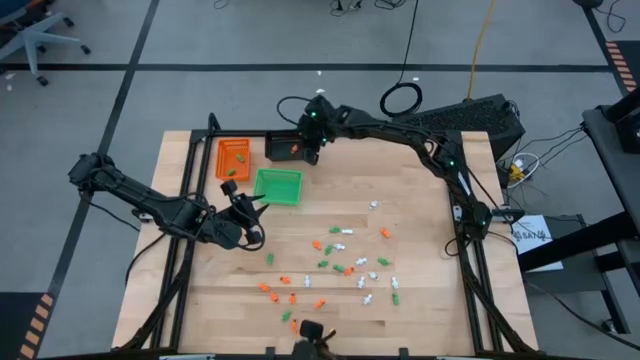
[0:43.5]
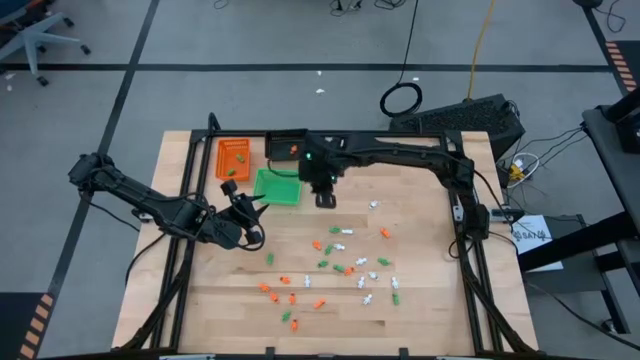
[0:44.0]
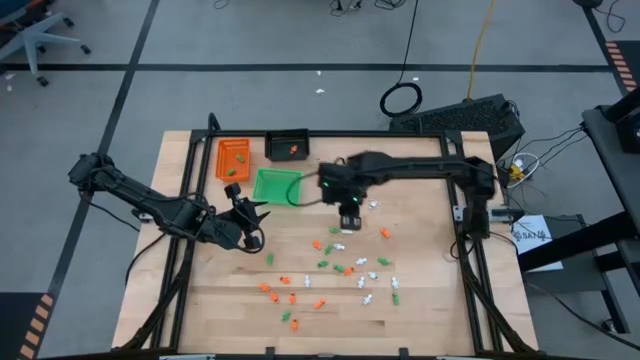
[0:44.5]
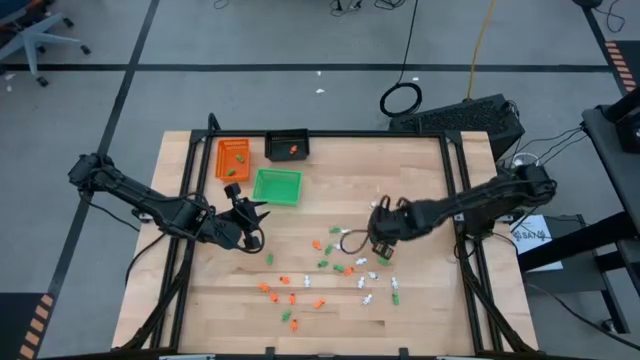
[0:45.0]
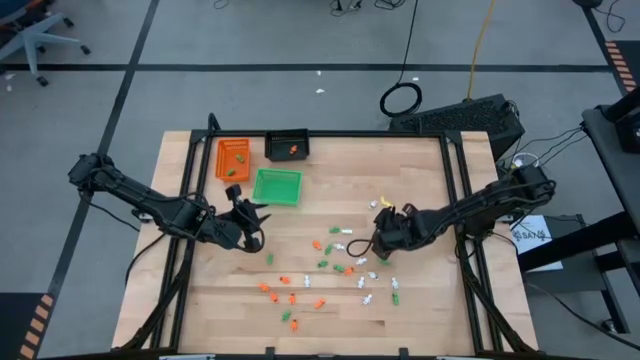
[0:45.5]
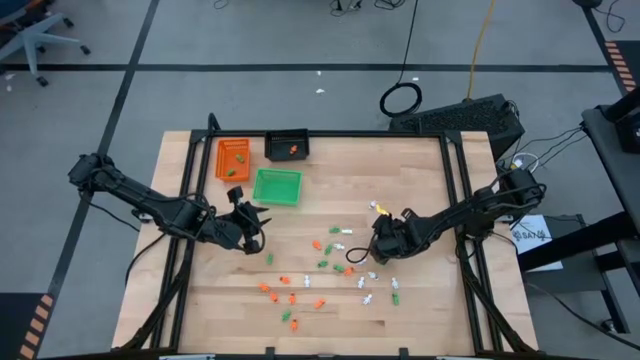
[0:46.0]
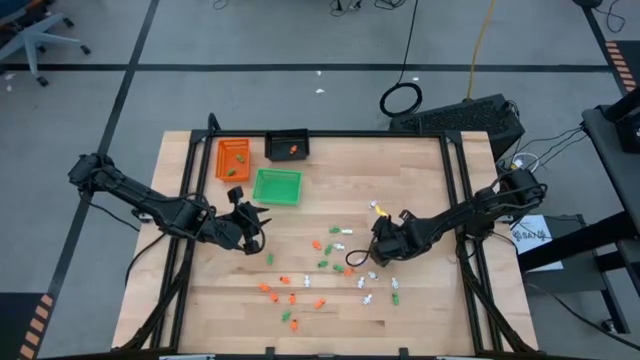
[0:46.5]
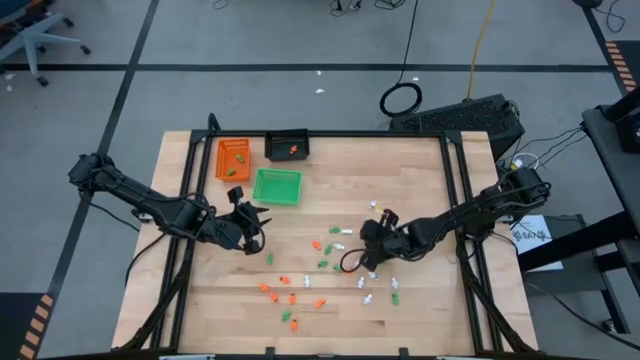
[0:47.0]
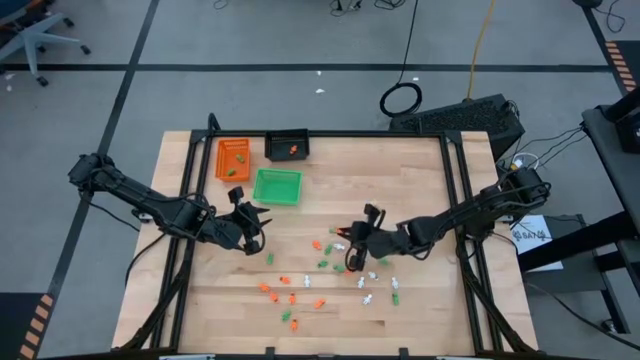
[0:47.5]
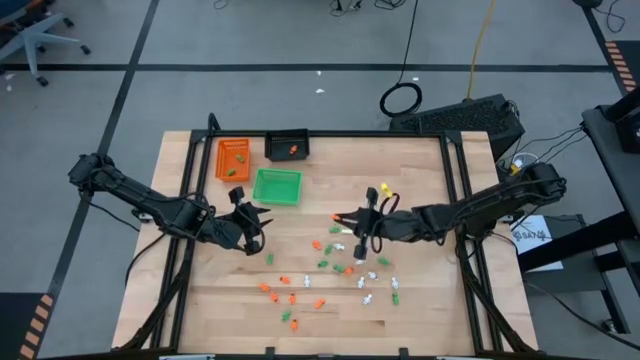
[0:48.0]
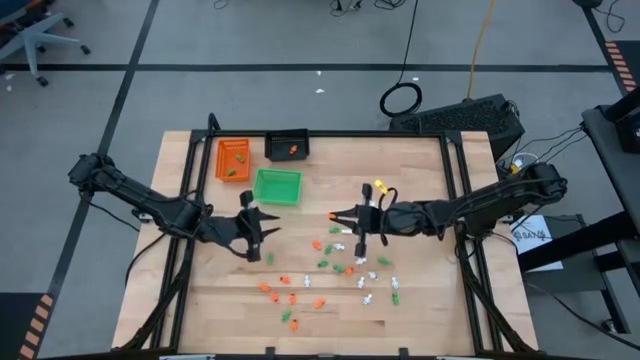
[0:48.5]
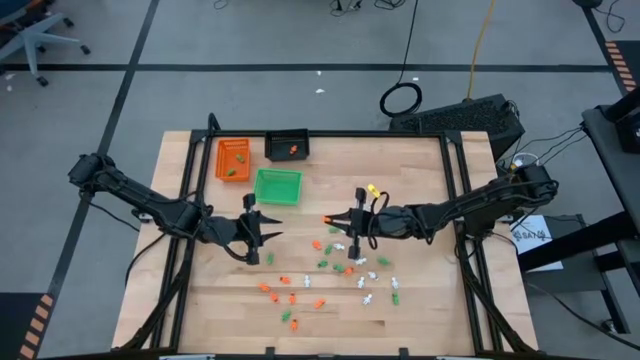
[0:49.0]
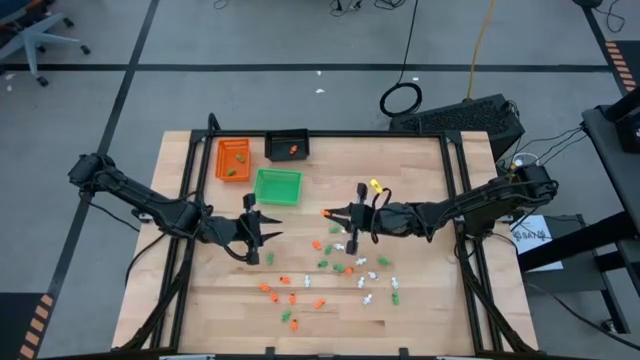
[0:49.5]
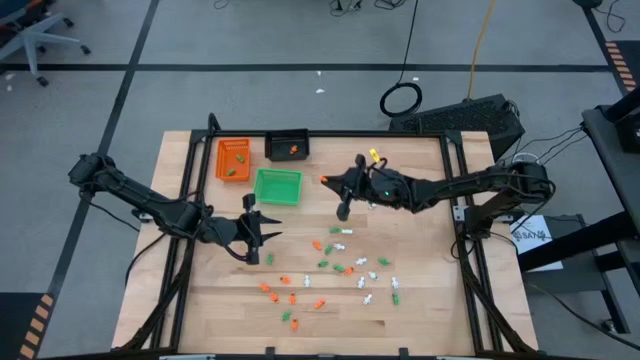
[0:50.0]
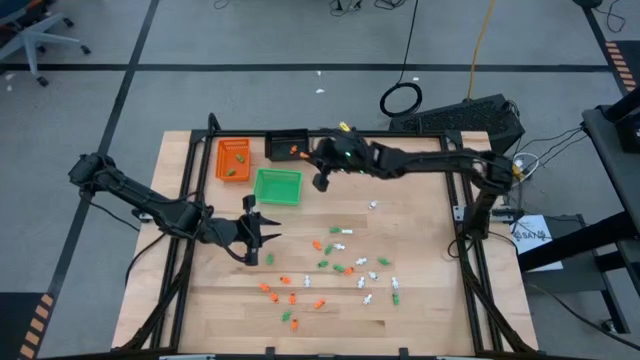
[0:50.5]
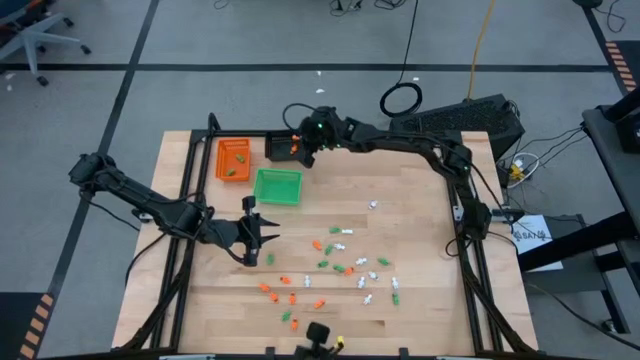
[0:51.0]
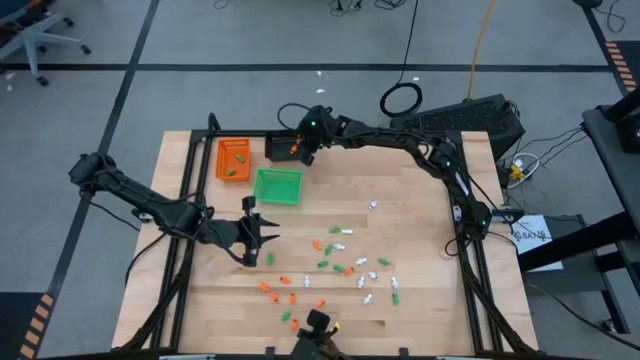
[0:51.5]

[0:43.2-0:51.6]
Task: Sort Halloween decoration
Put the orange skeleton toy into the black bin

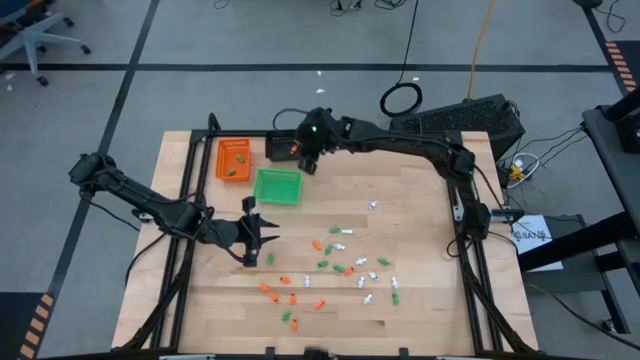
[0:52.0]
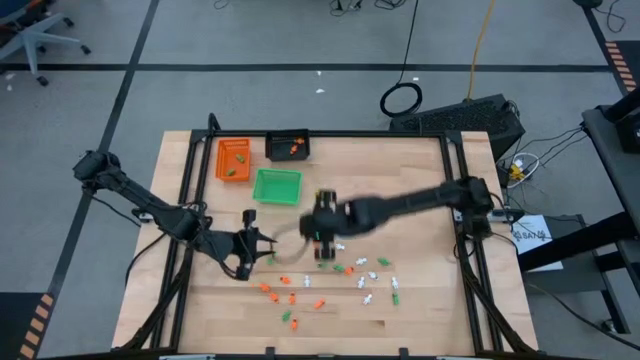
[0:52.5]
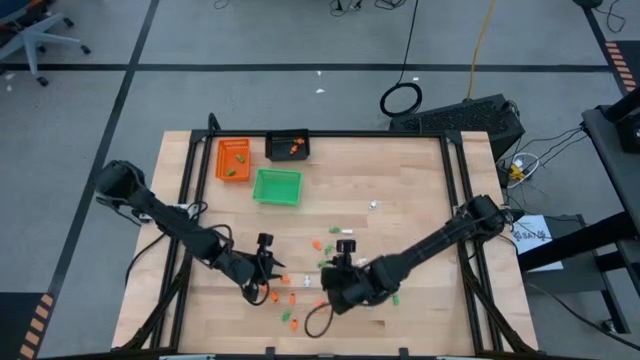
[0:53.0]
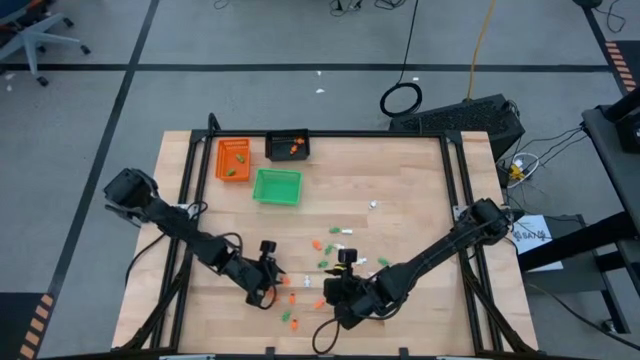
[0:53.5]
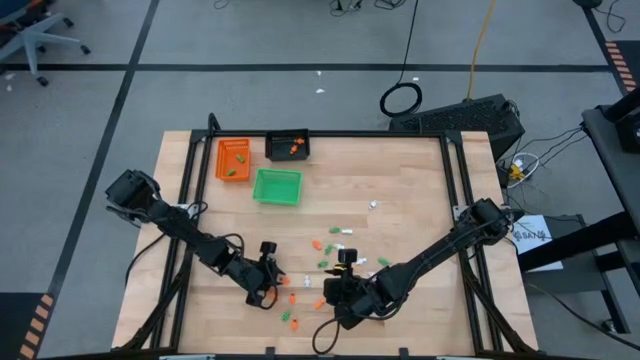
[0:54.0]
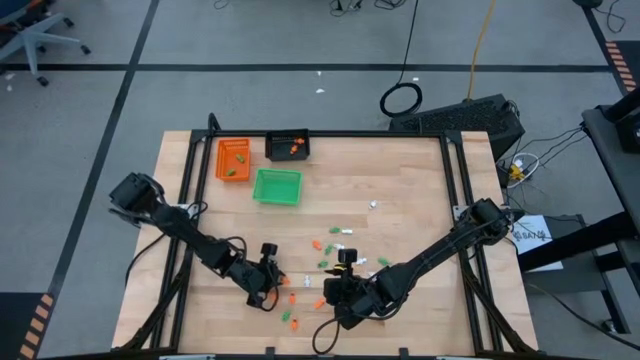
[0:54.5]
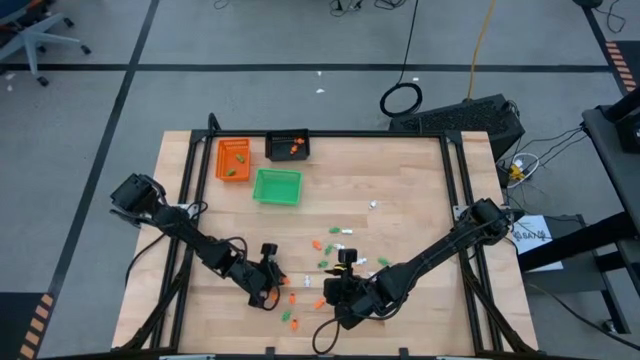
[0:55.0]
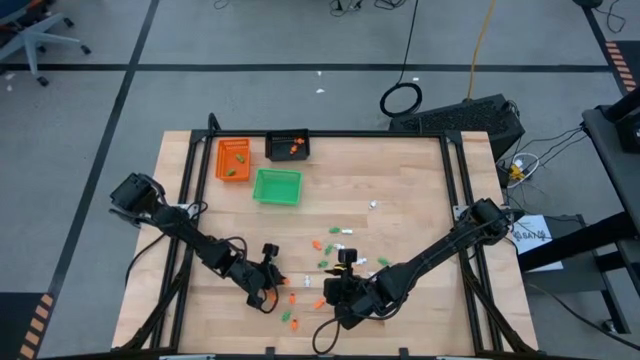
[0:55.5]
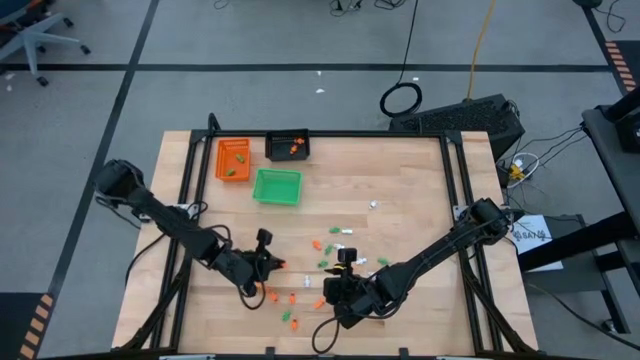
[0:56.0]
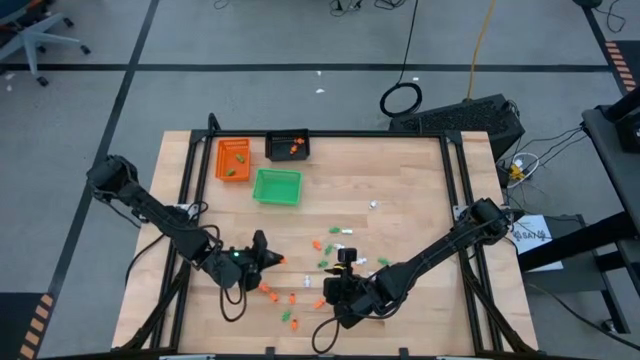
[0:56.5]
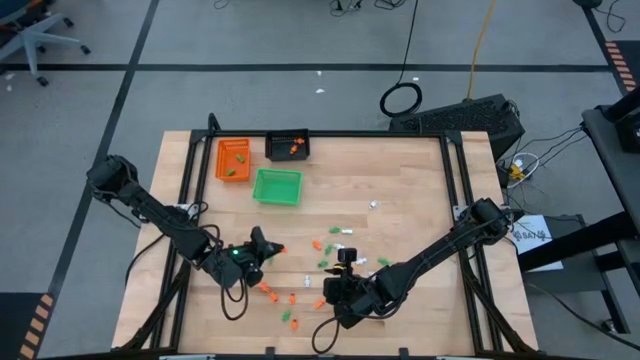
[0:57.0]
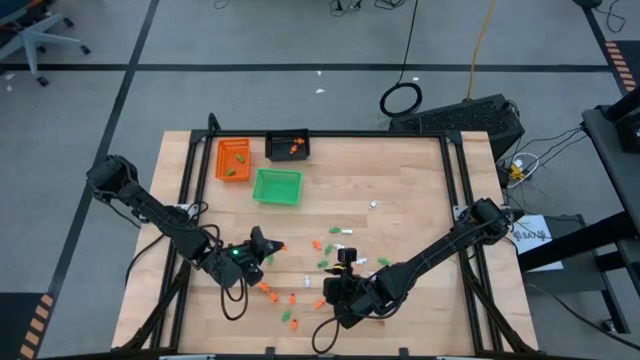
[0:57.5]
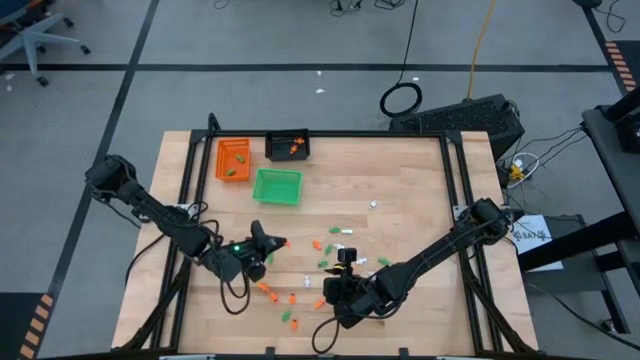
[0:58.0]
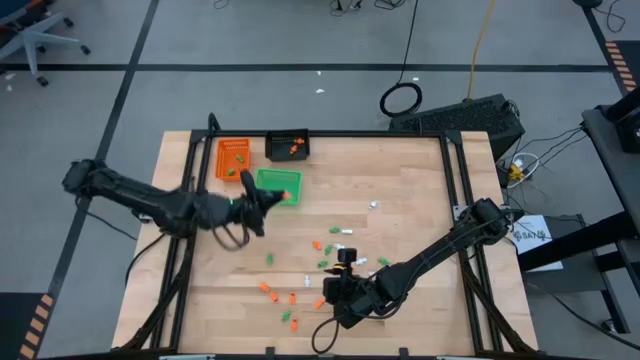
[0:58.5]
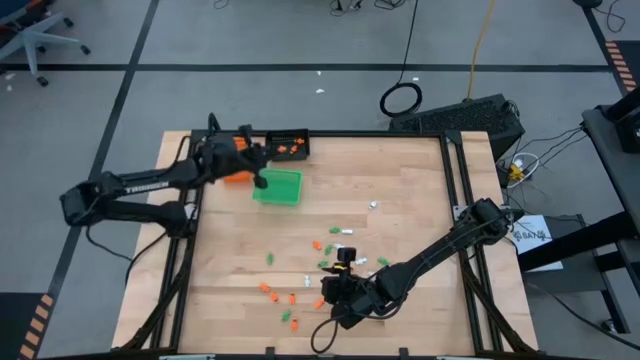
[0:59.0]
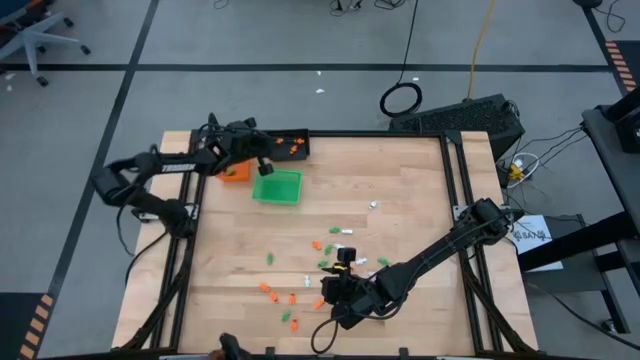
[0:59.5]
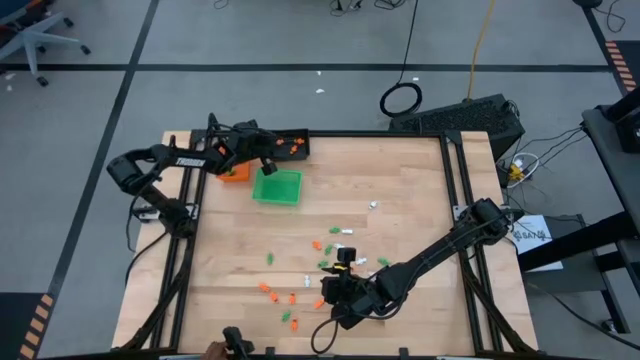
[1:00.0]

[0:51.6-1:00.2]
Put the orange skeleton toy into the black bin

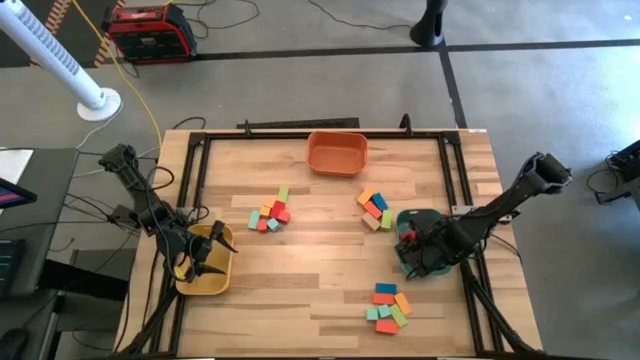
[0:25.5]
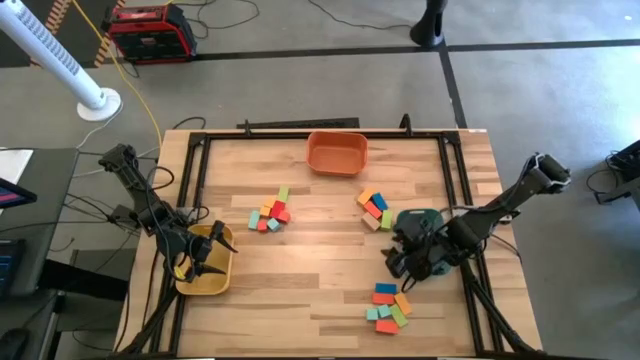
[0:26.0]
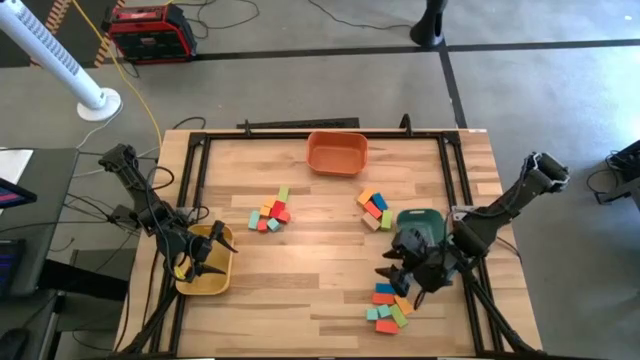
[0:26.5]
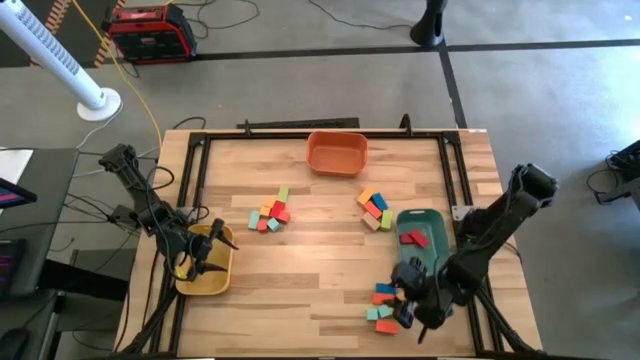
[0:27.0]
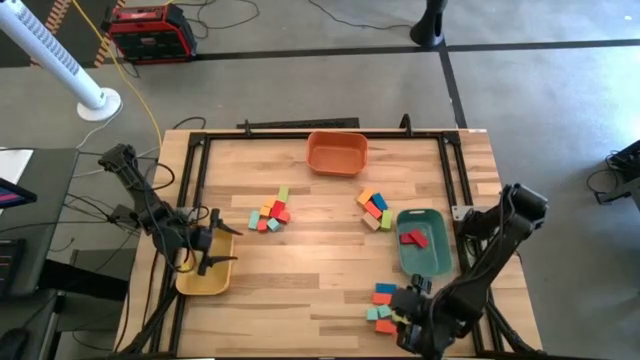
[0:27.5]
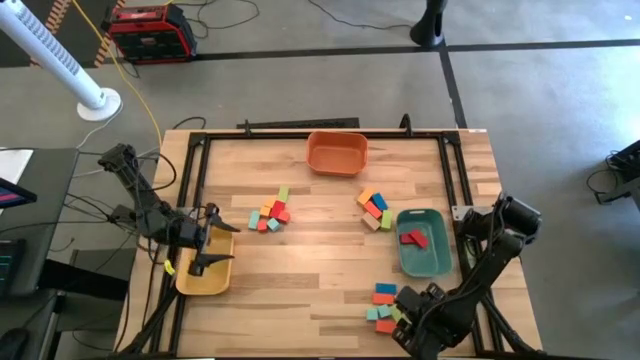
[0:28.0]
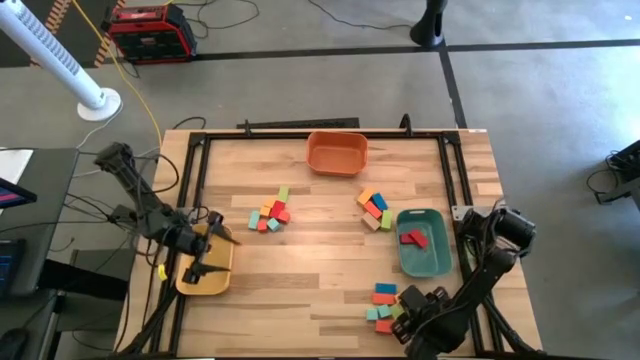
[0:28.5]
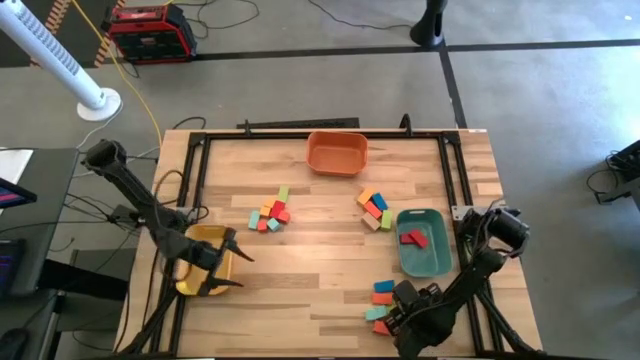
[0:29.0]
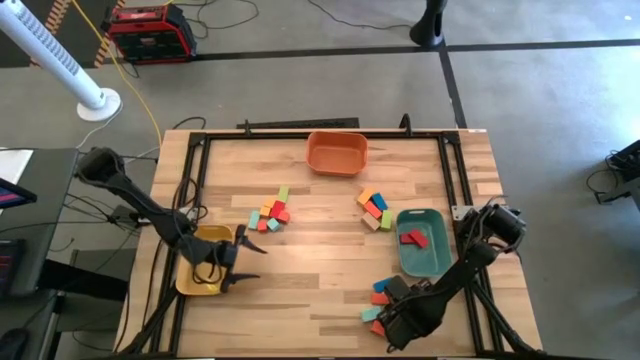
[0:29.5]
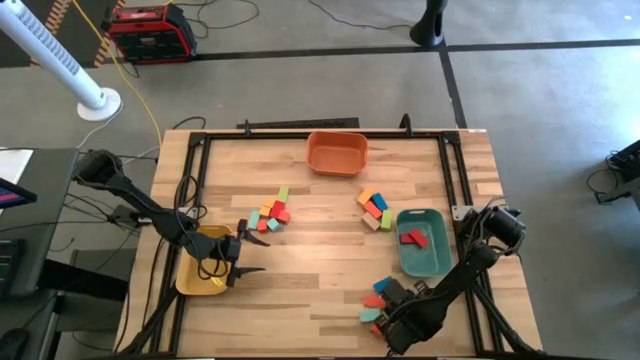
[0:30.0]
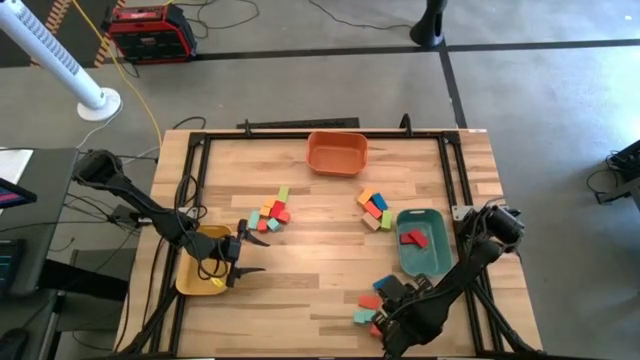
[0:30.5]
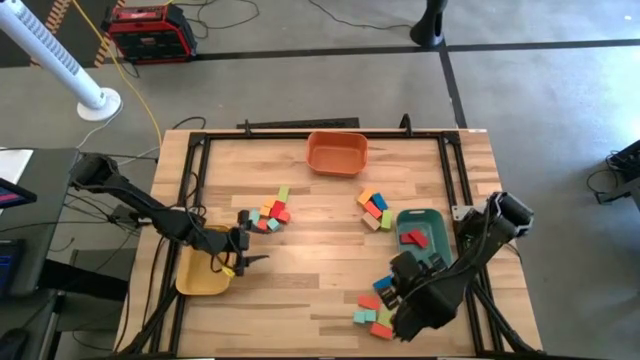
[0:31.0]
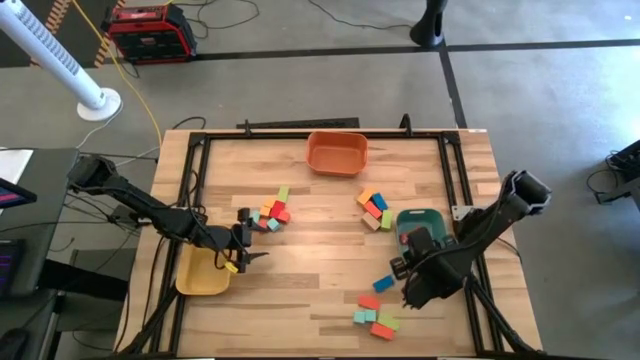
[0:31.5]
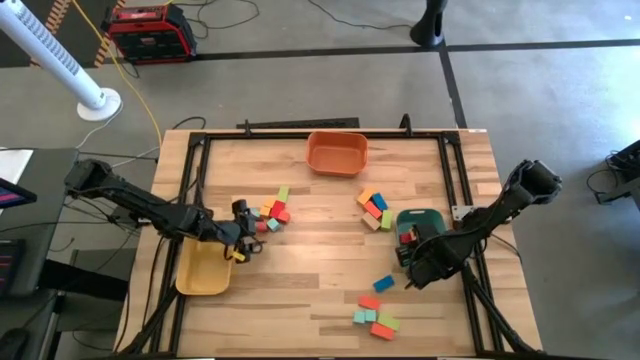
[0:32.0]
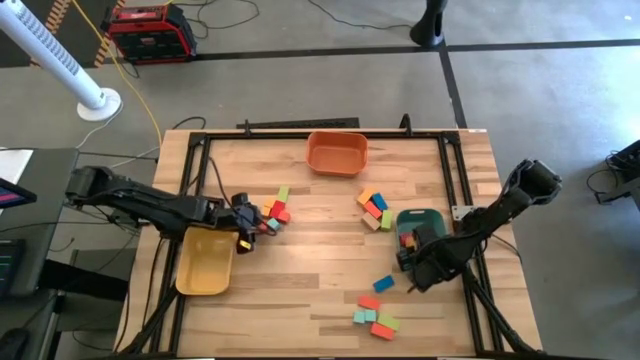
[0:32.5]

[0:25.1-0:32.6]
Task: Sort blocks by size
Put the medium yellow block into the green bin
